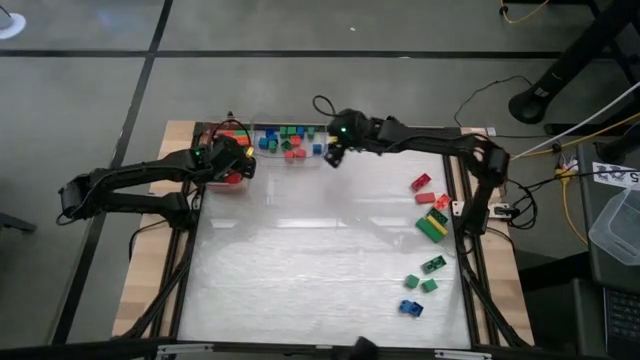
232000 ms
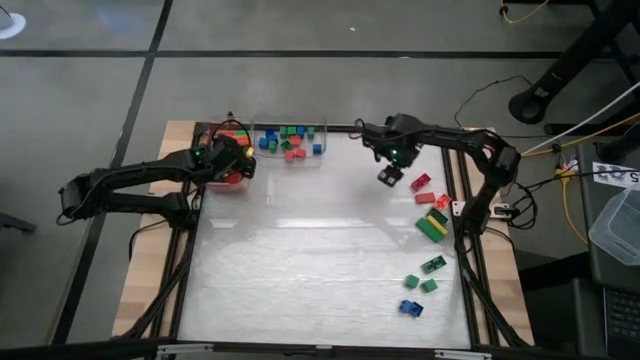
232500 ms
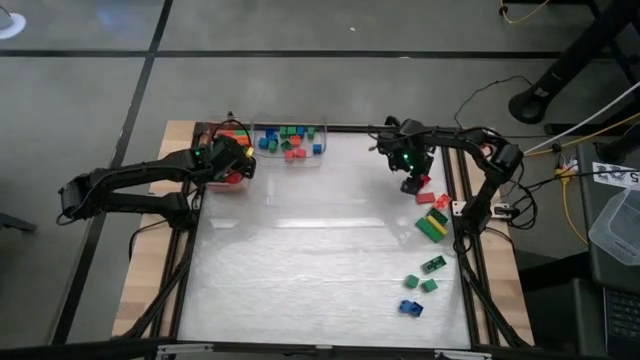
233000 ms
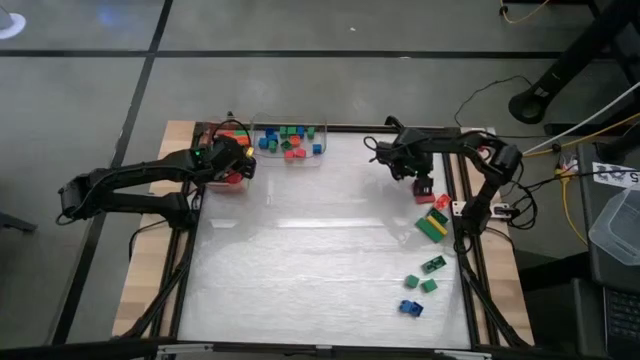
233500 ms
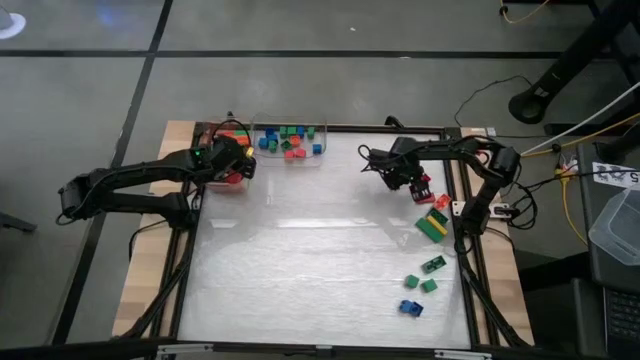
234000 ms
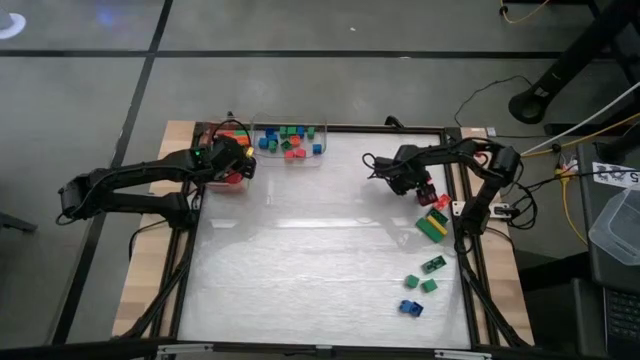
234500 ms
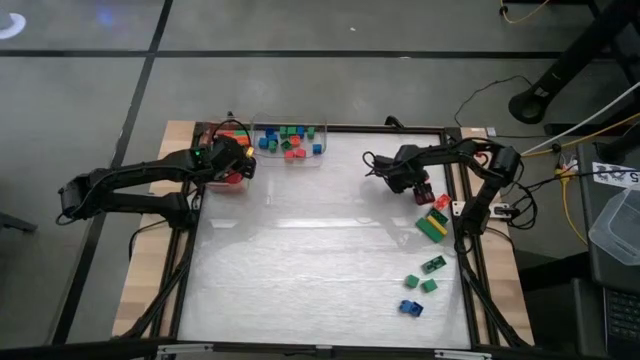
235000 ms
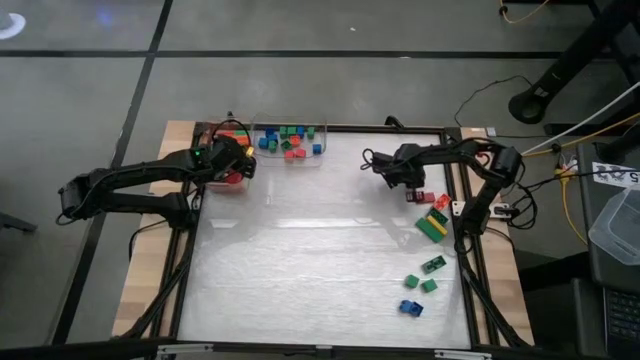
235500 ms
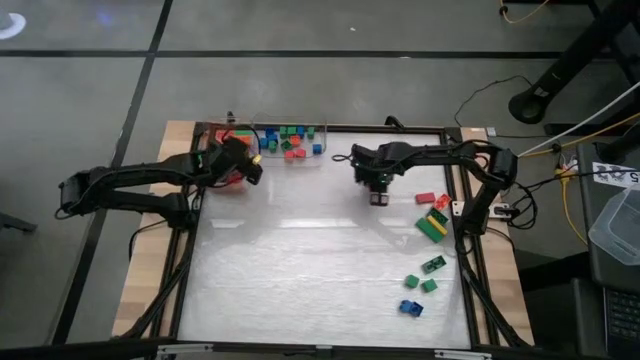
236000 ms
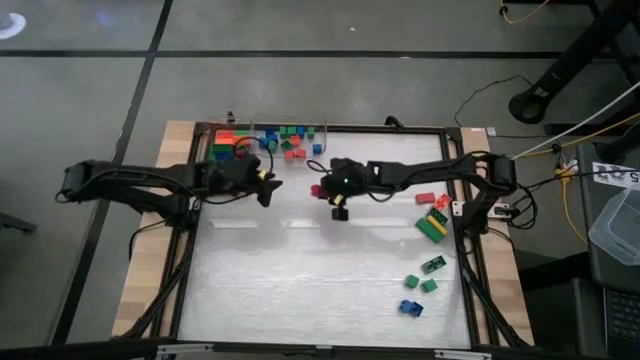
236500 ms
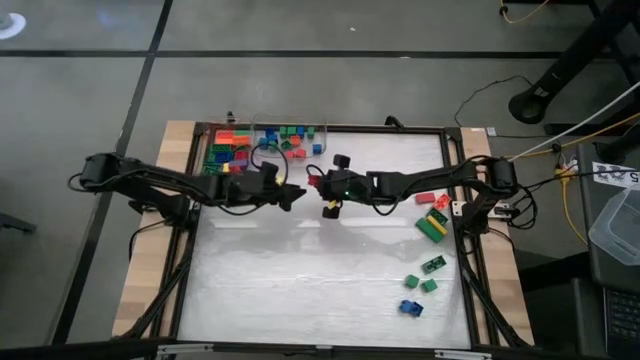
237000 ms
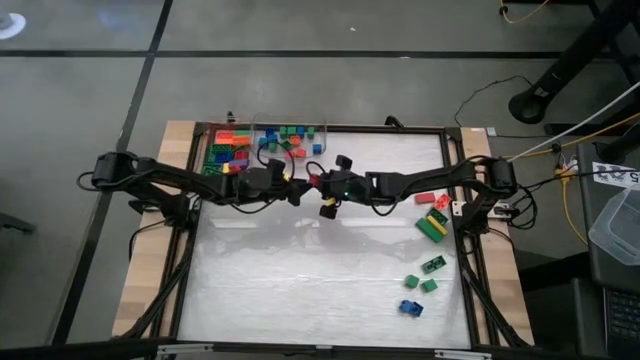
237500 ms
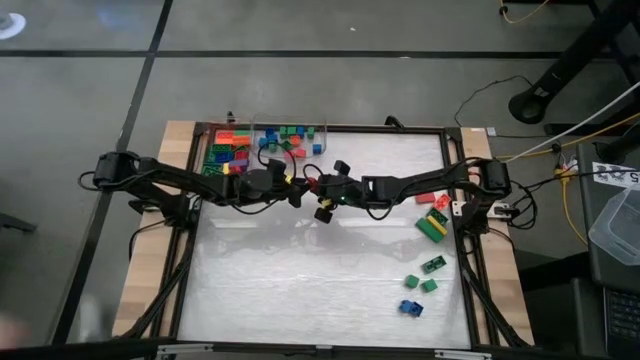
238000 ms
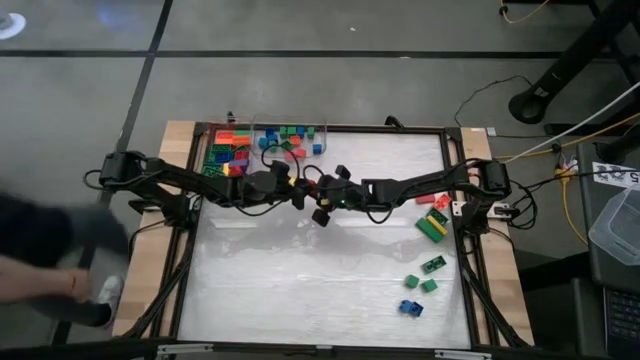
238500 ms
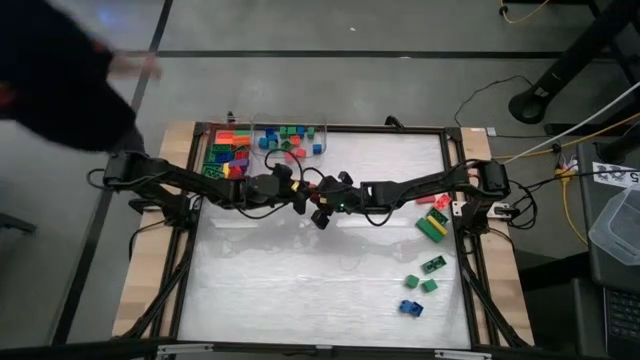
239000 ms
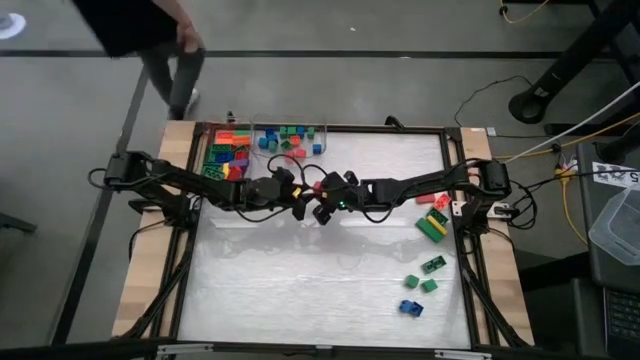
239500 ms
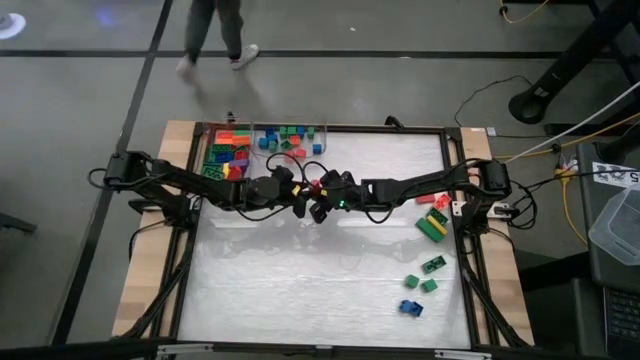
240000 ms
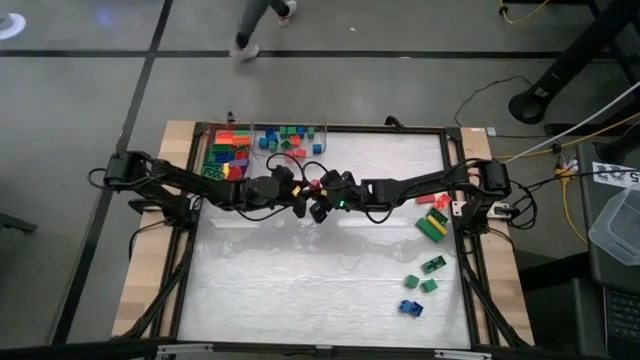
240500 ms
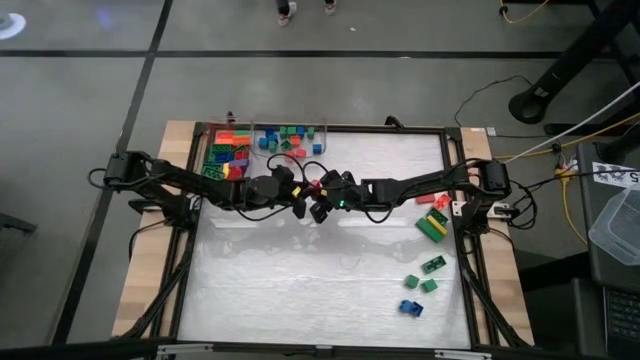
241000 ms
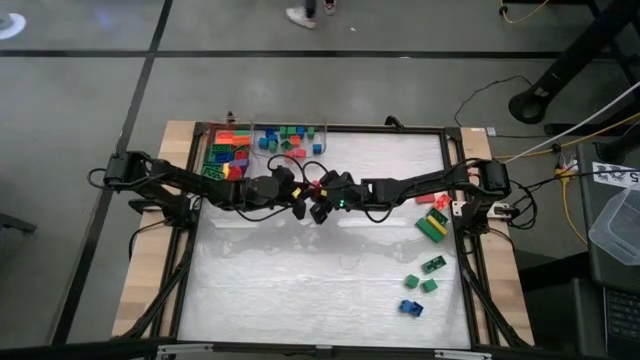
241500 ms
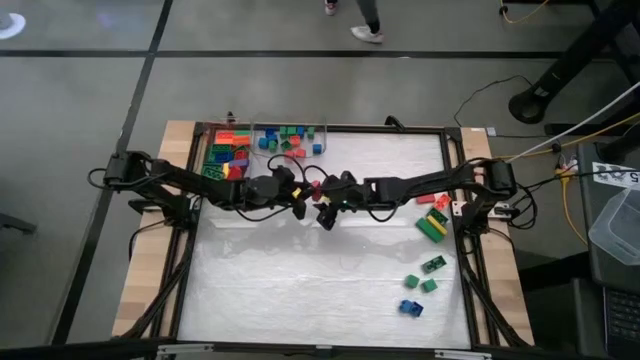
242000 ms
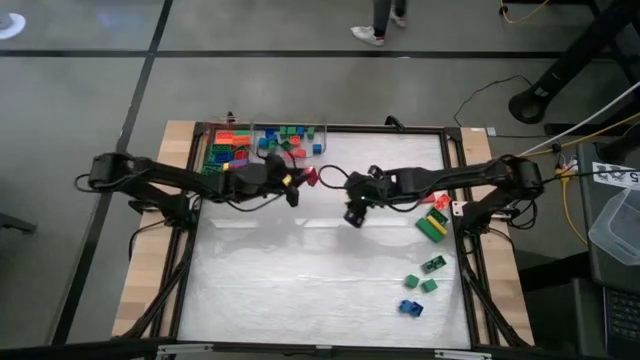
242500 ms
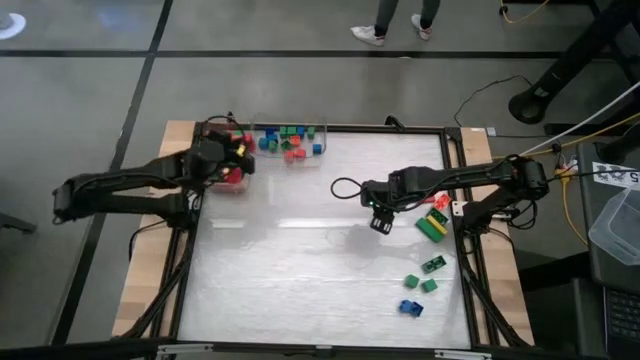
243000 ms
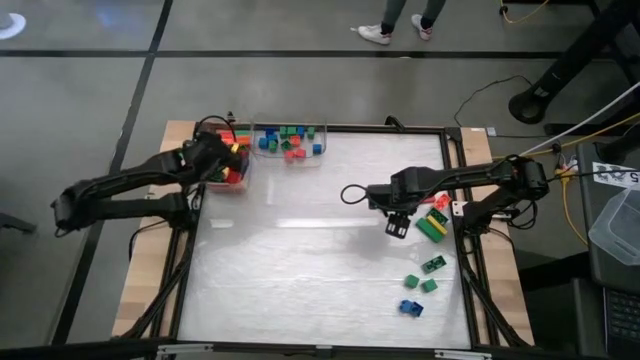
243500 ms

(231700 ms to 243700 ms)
Task: Sort blocks by size
Put the large orange game piece into the left transparent bin

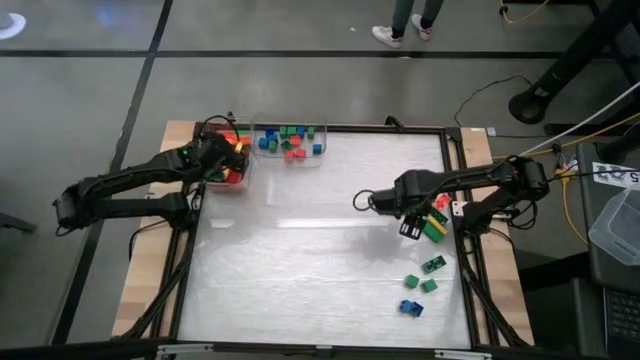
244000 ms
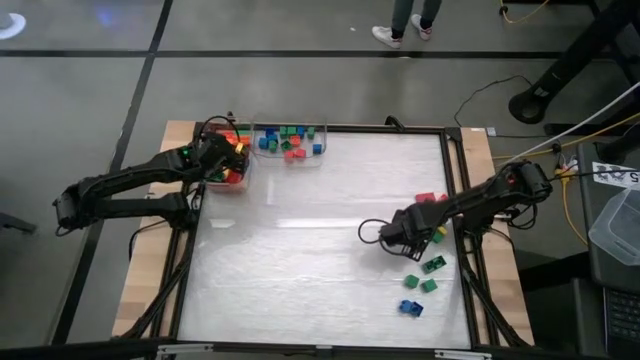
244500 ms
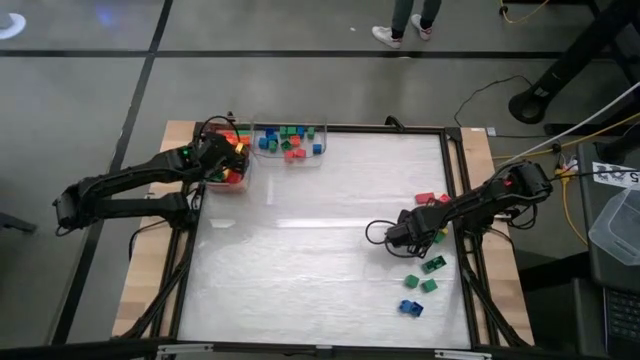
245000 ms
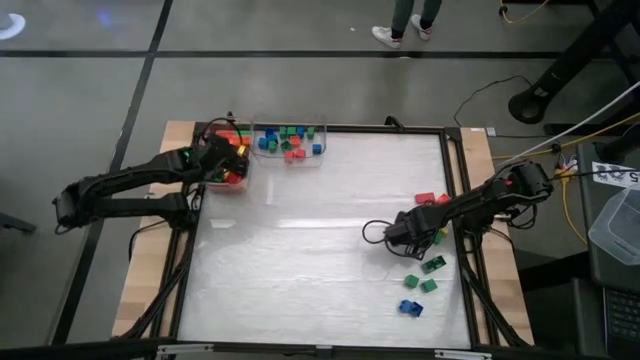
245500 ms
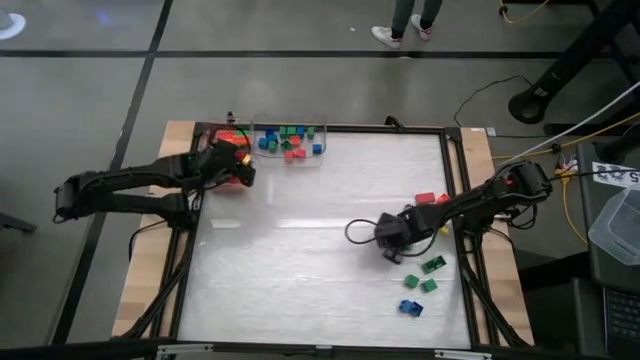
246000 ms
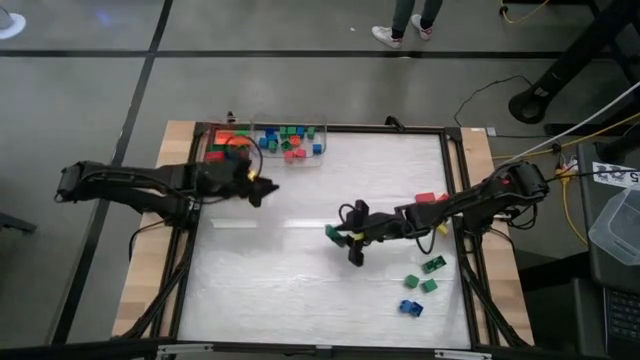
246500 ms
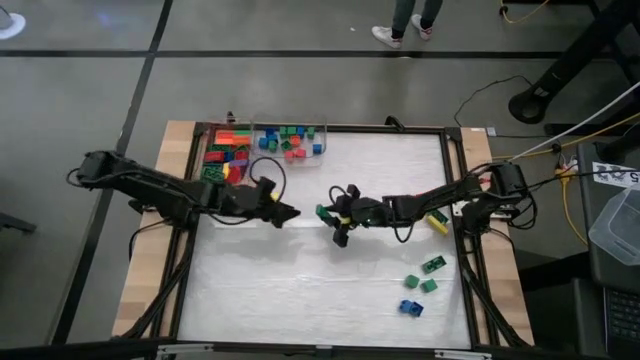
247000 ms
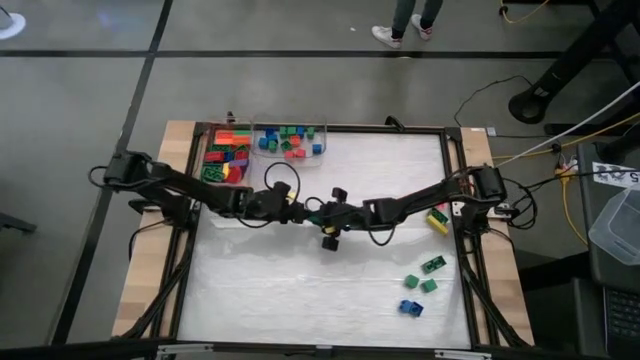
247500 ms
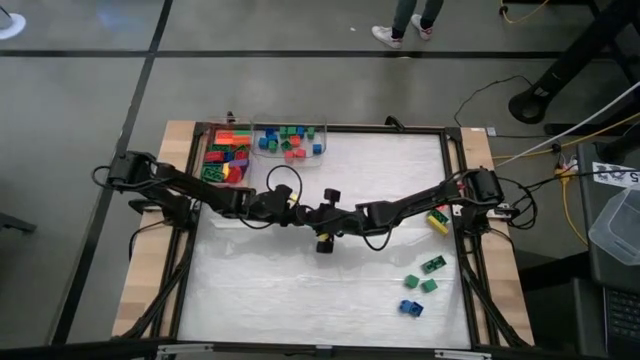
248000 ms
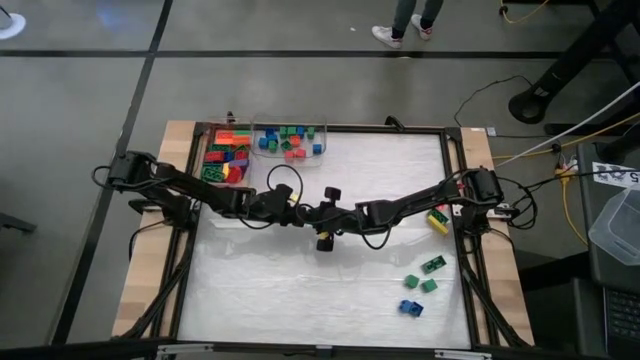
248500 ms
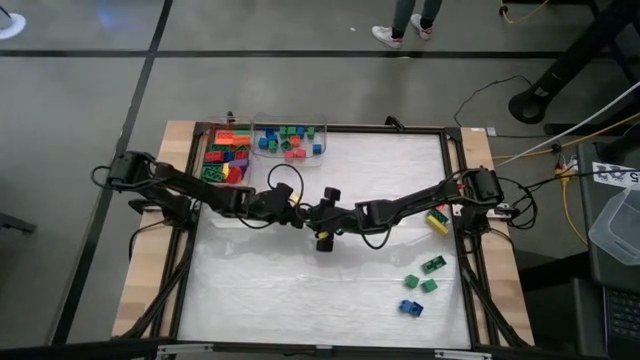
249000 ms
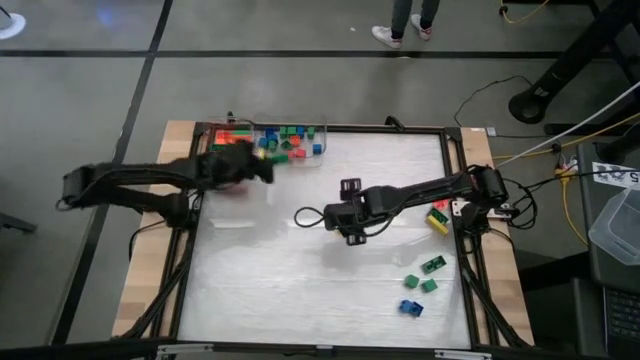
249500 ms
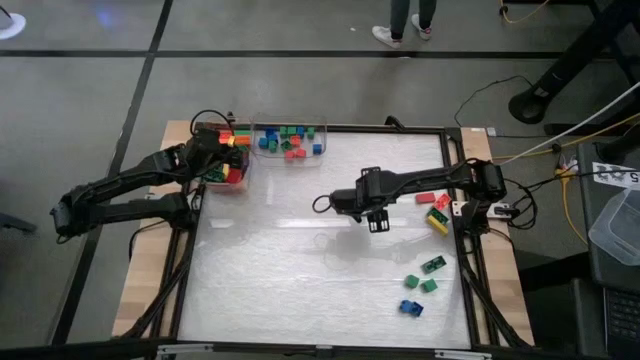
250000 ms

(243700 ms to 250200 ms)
Put the large green block into the left transparent bin
